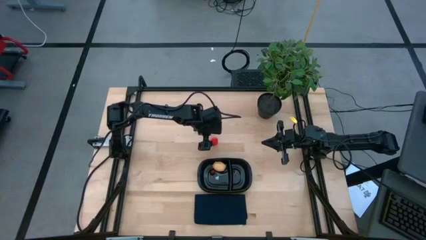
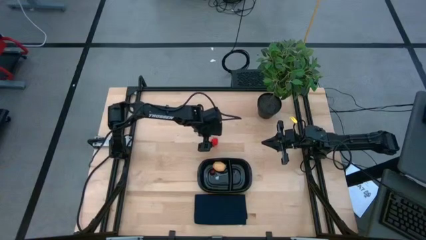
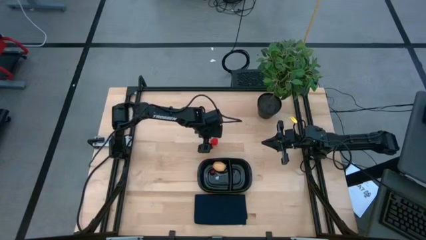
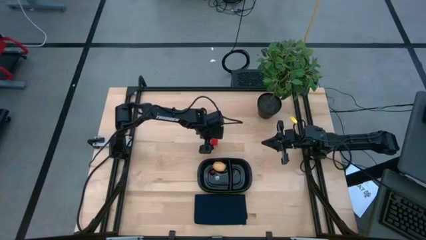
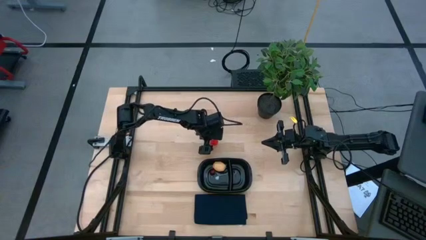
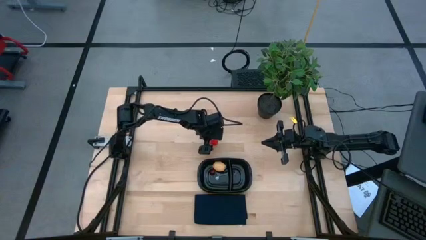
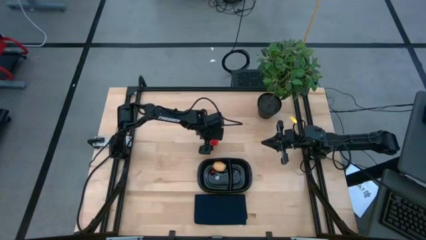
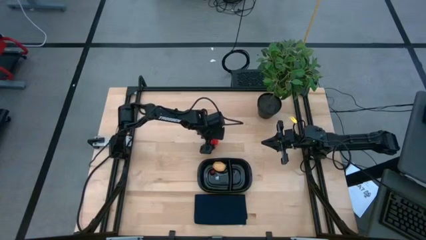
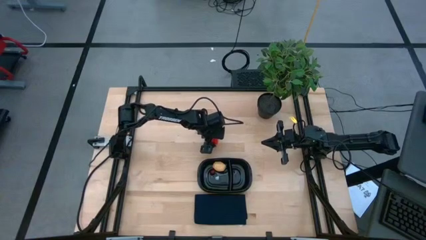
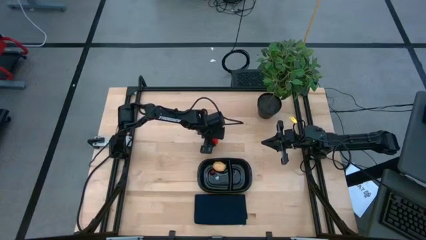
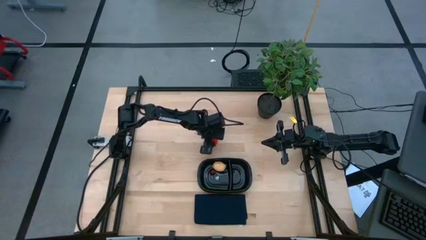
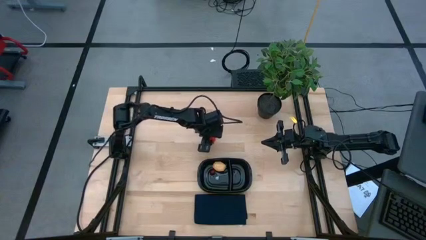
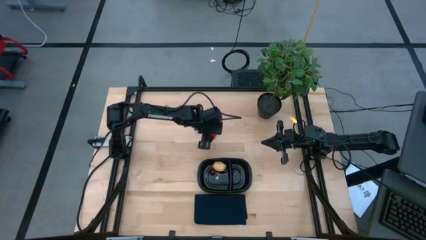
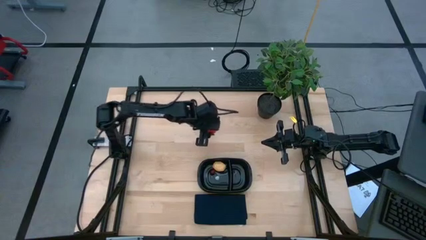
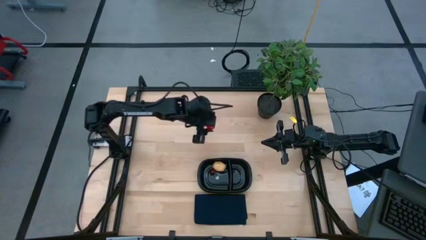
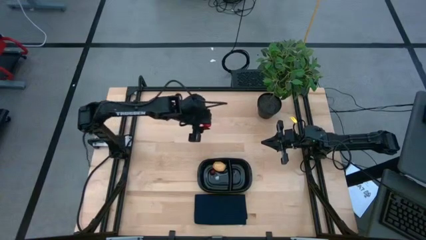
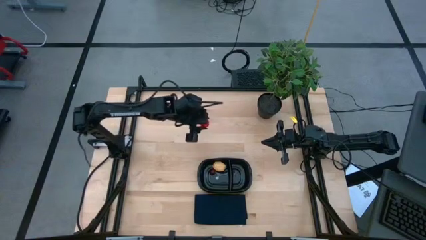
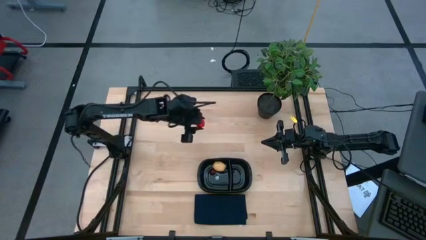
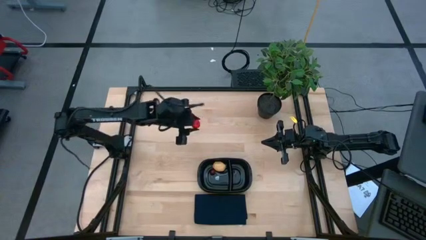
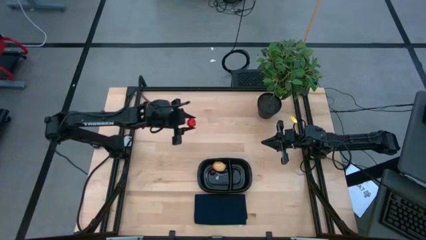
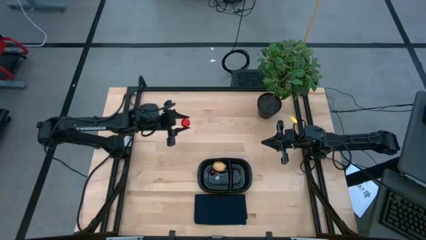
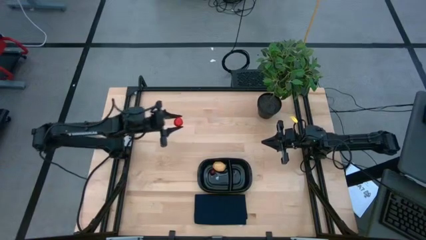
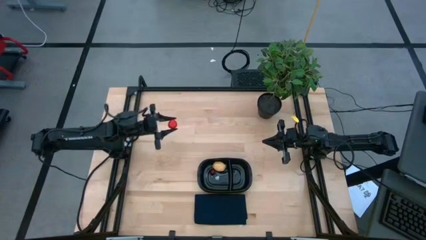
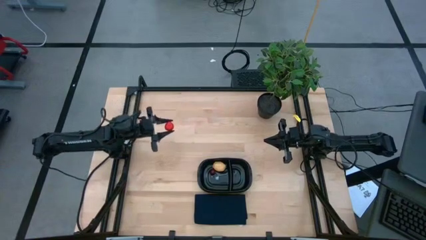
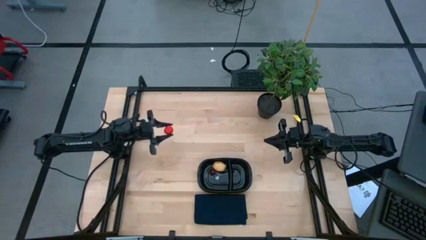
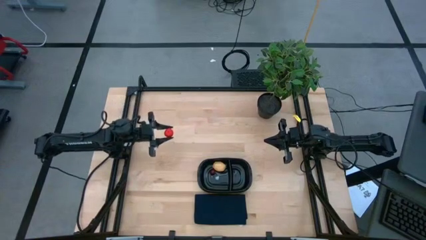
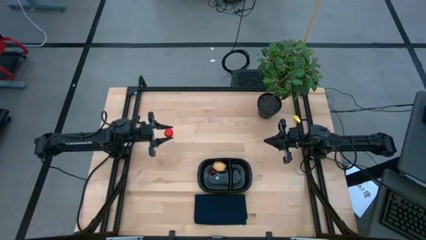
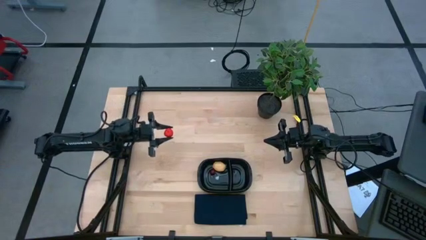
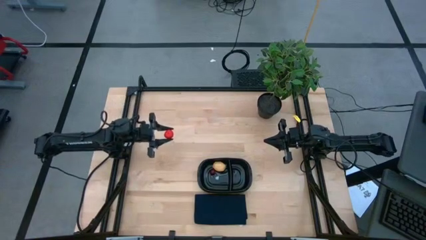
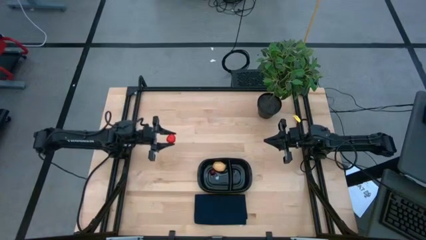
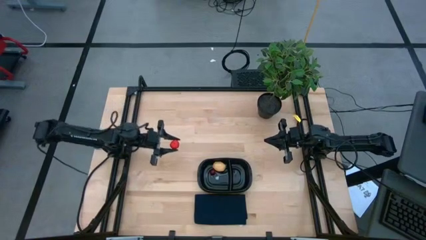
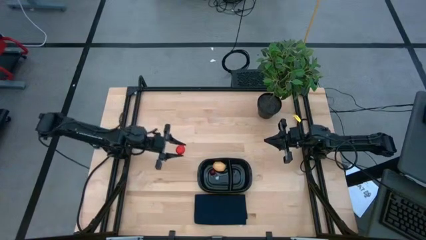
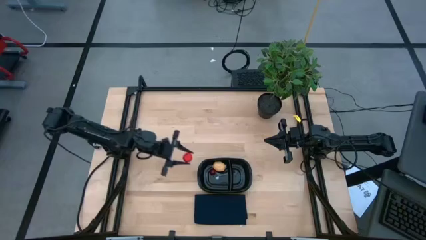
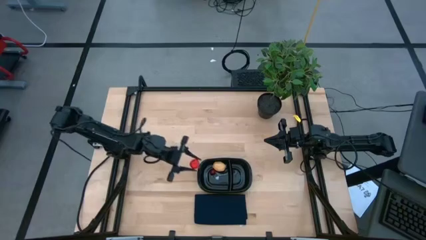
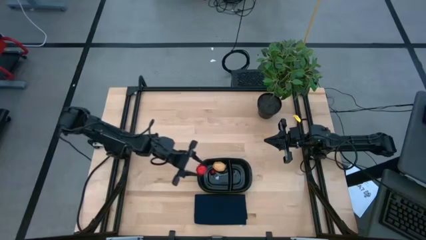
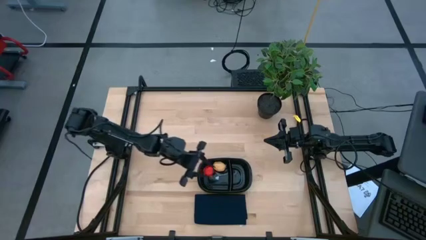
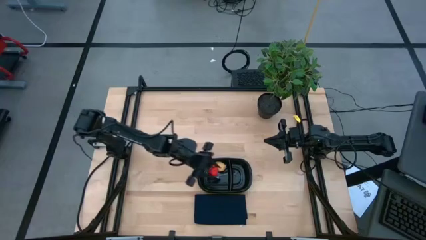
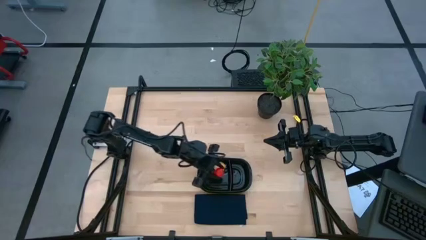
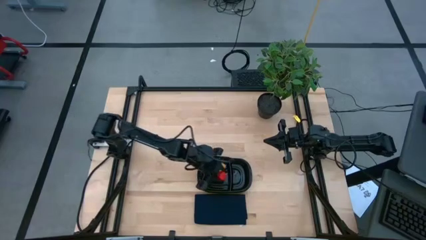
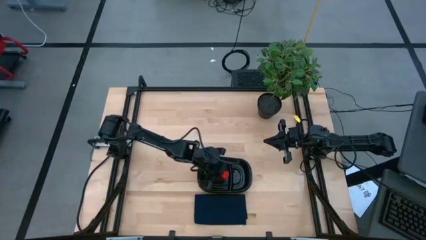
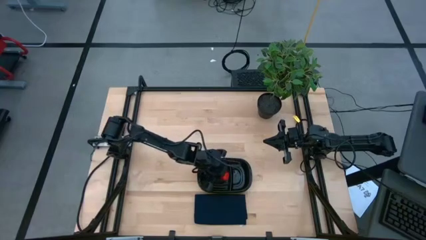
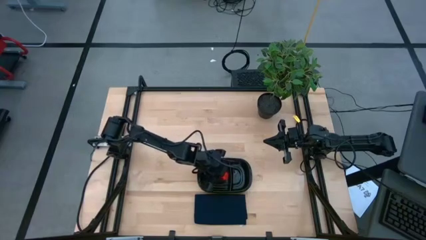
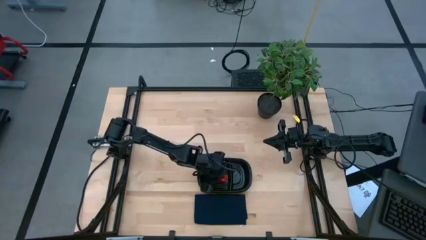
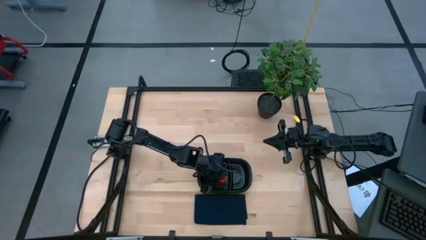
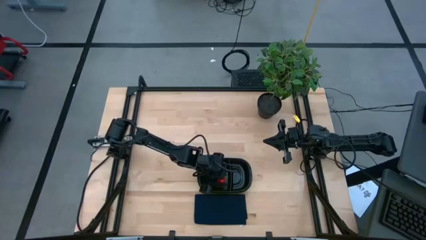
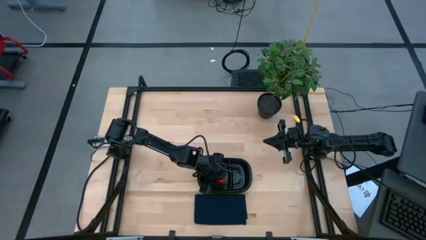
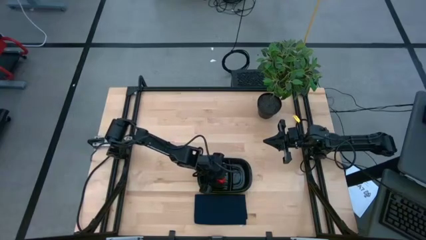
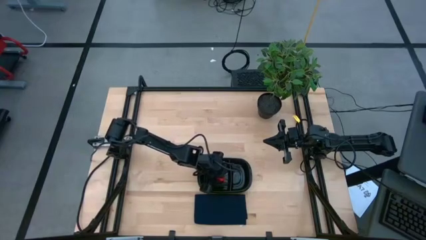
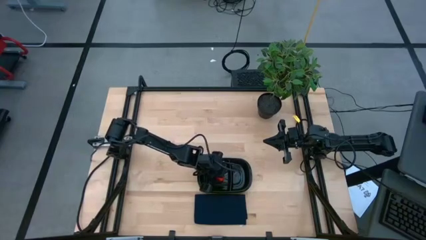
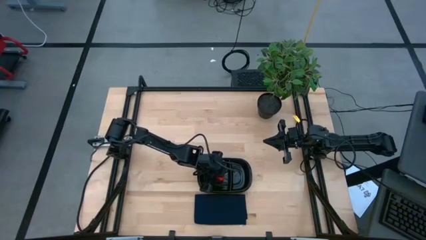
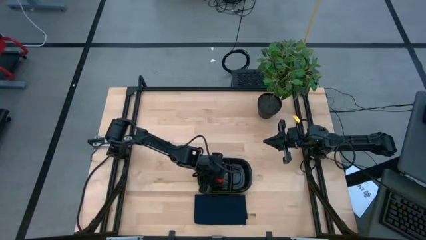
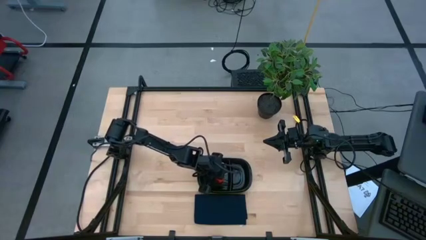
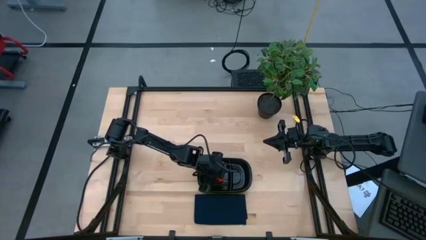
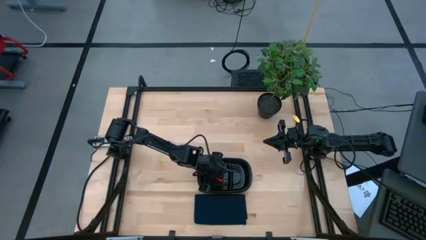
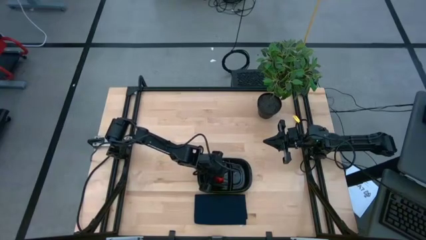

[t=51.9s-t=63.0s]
Task: Pick and placing Produce into tupperware
Put the strawberry into the black container

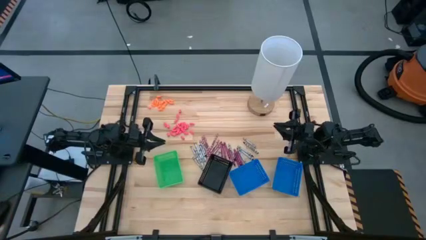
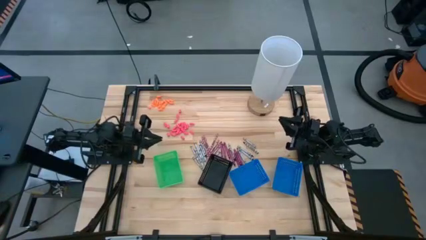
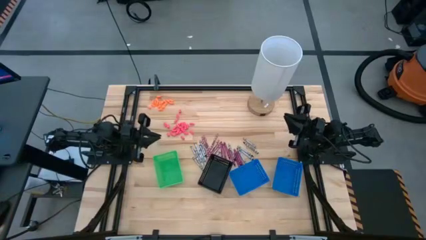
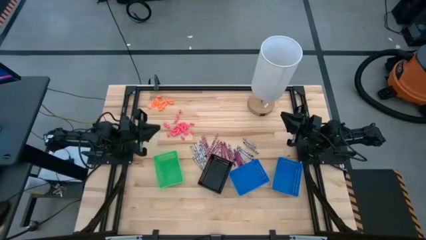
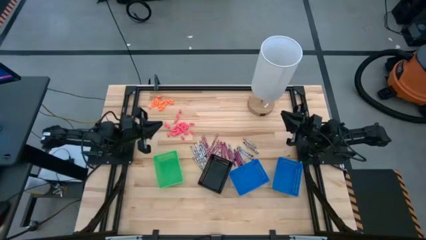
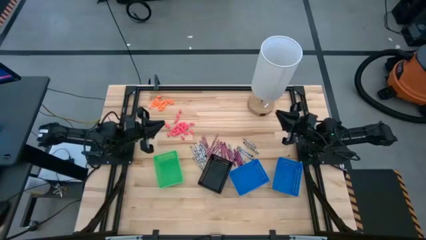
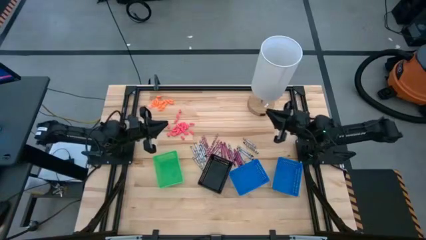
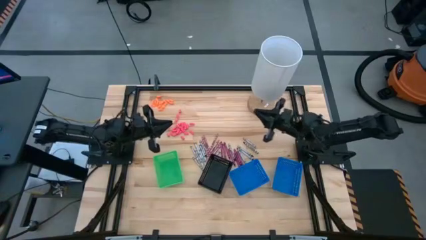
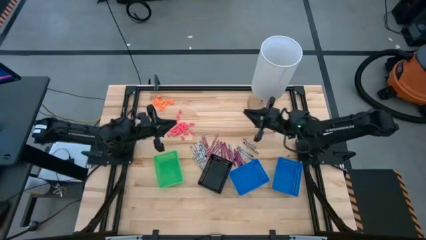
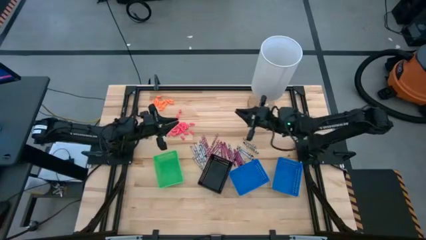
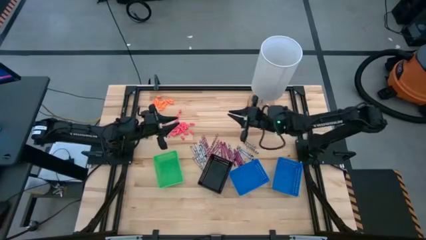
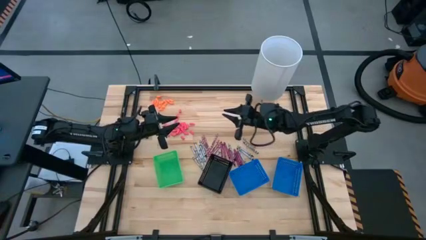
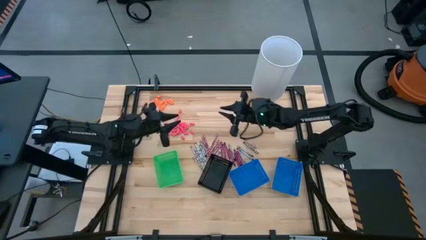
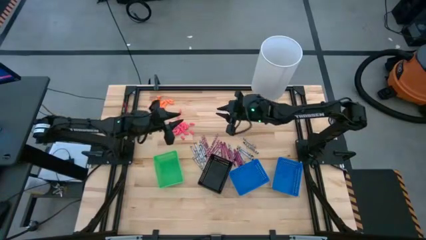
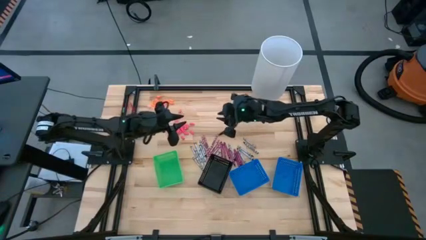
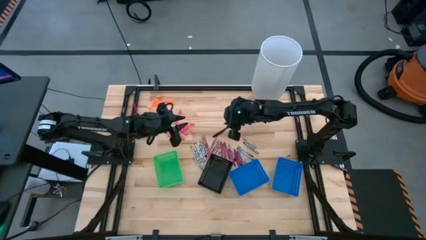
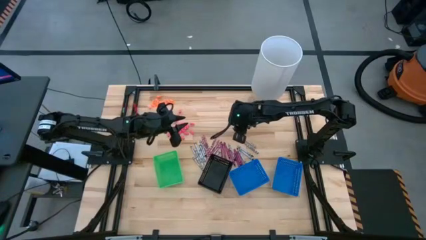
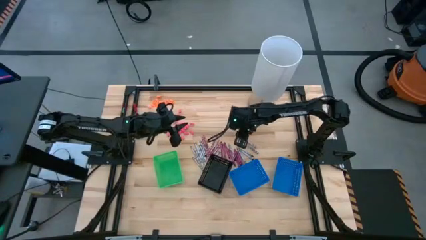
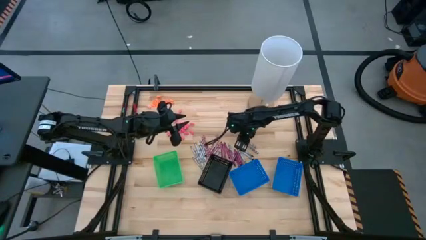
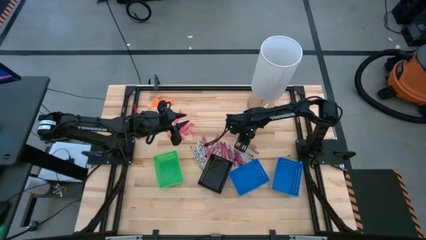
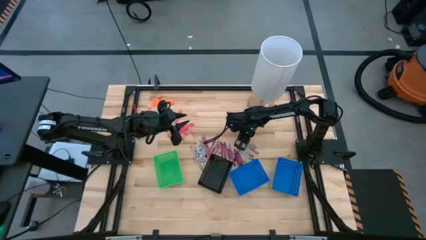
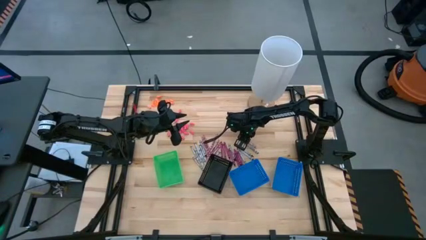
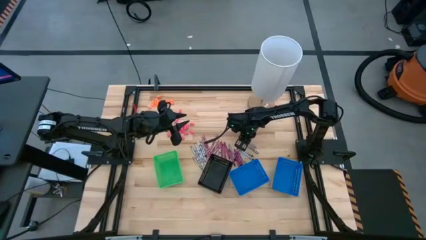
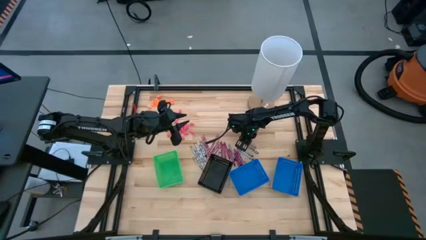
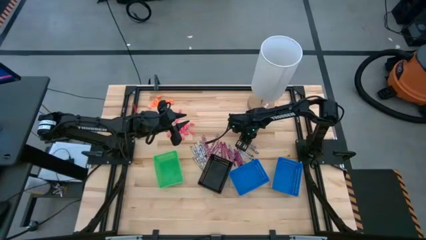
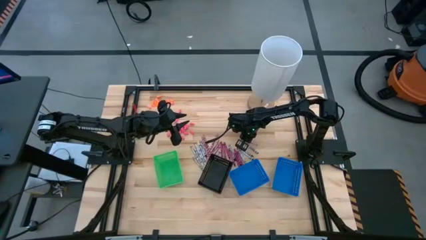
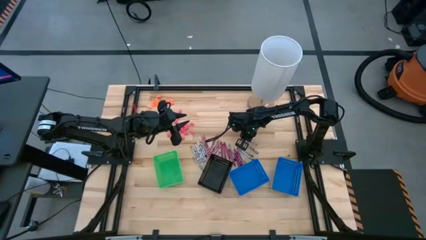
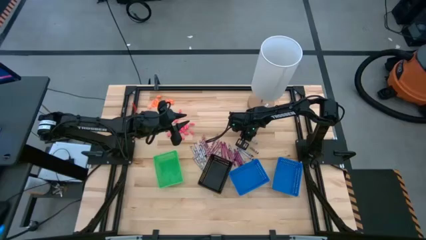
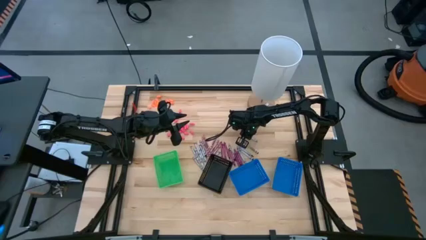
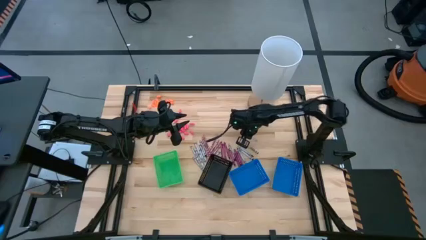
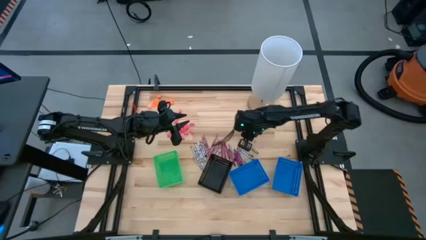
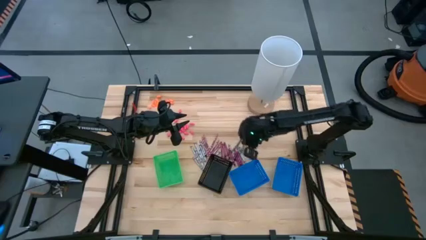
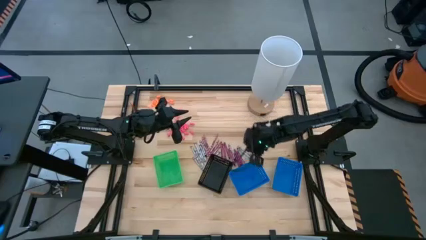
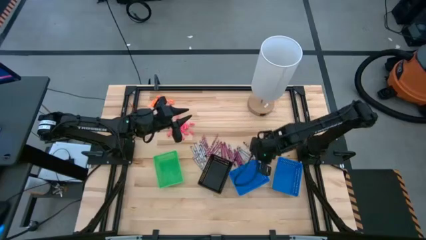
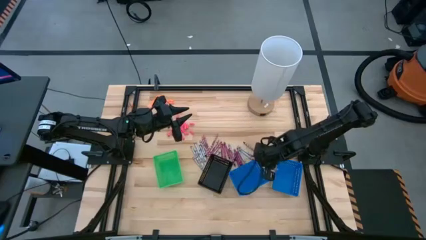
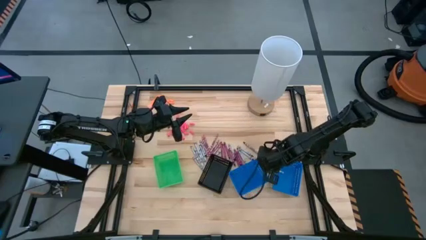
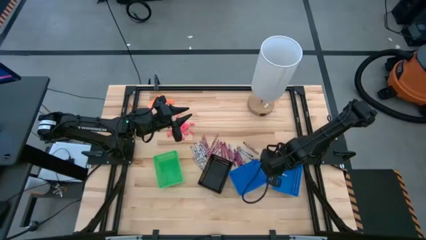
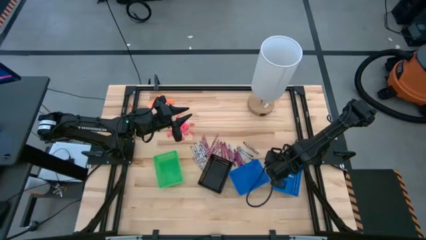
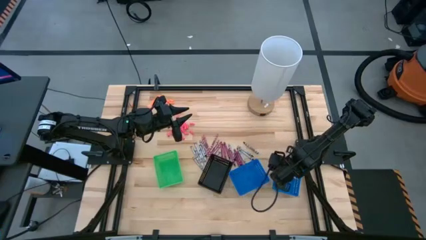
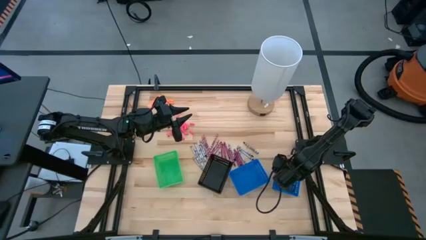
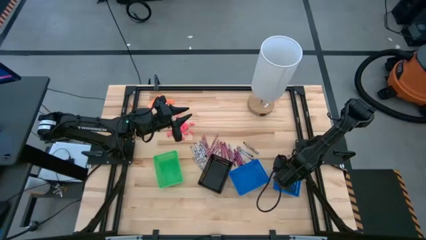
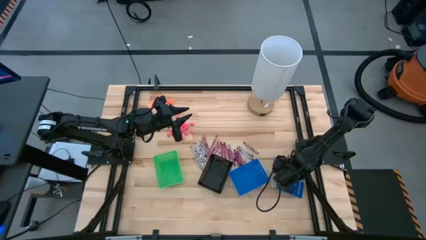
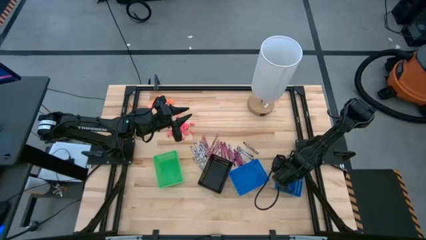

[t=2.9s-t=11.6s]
Task: Sort crayons
Put the black crayon into the right blue bin
